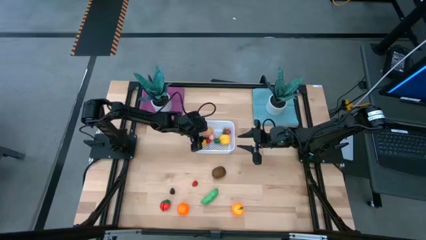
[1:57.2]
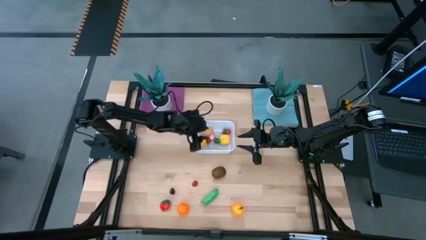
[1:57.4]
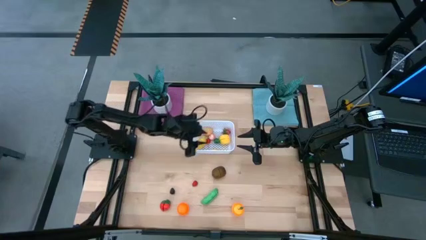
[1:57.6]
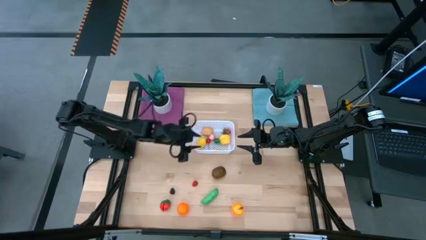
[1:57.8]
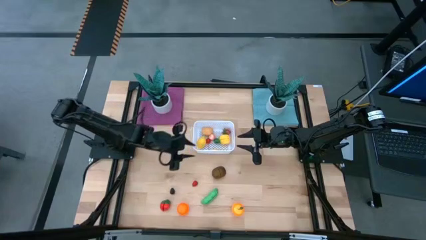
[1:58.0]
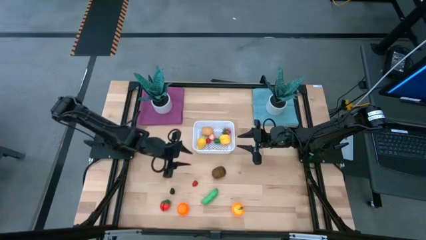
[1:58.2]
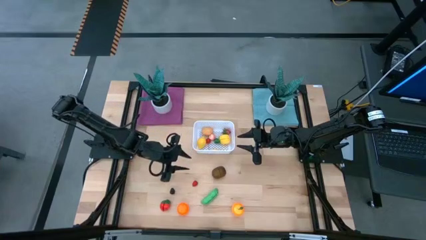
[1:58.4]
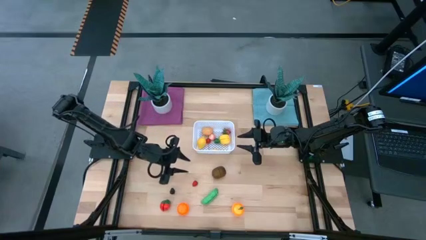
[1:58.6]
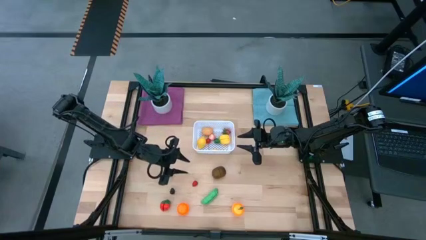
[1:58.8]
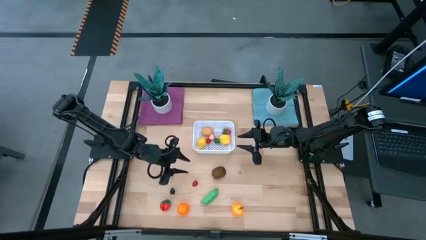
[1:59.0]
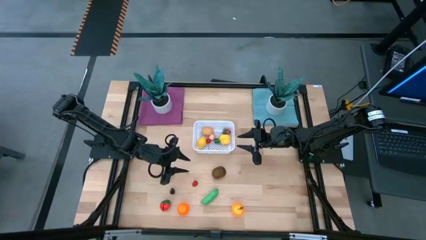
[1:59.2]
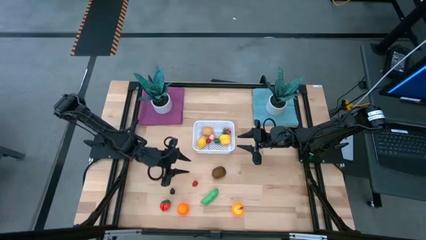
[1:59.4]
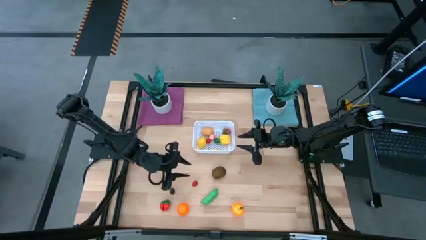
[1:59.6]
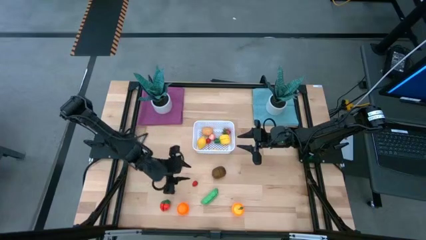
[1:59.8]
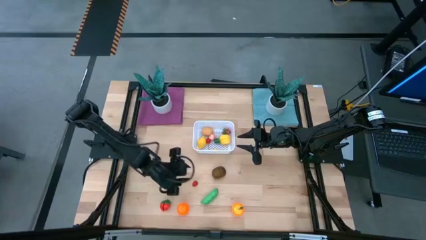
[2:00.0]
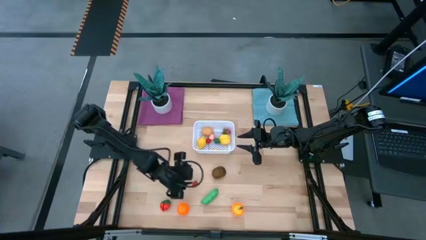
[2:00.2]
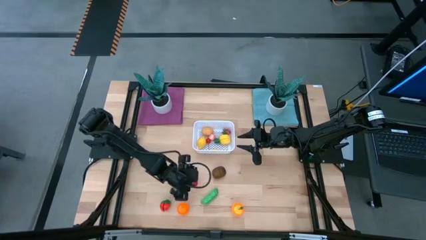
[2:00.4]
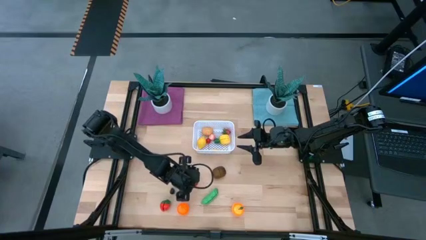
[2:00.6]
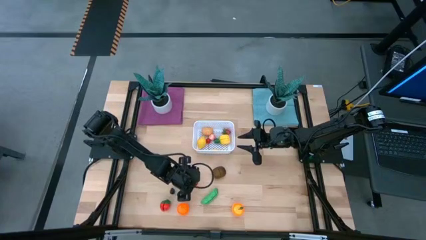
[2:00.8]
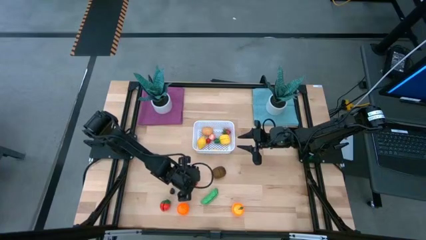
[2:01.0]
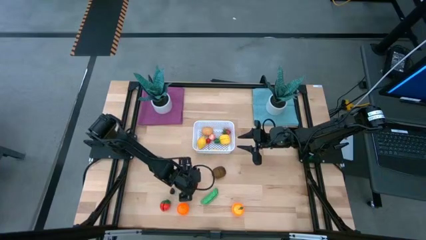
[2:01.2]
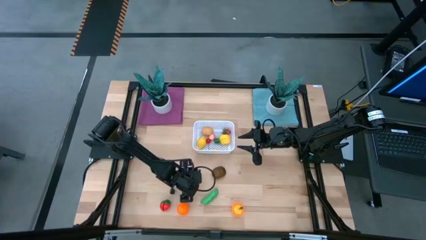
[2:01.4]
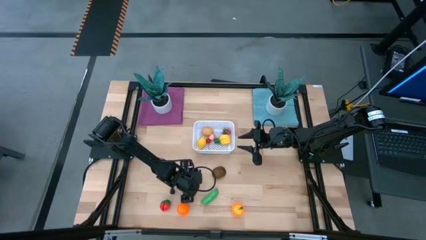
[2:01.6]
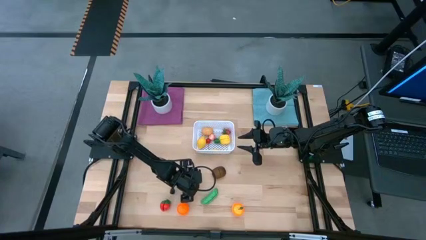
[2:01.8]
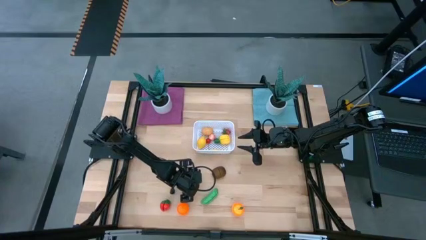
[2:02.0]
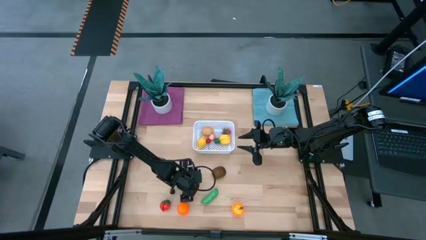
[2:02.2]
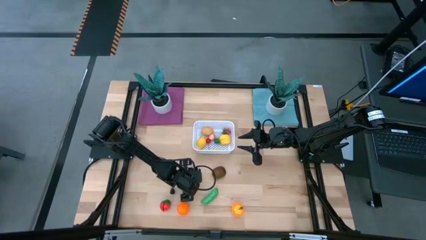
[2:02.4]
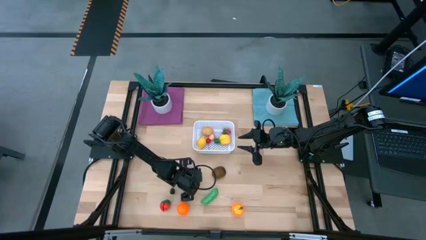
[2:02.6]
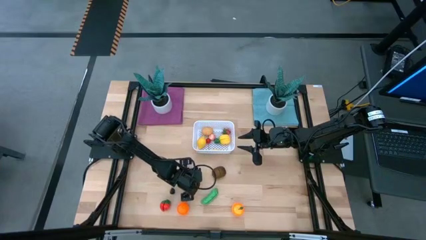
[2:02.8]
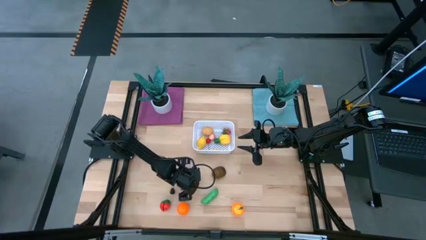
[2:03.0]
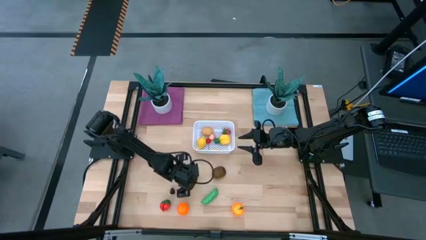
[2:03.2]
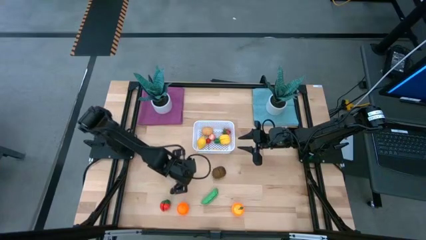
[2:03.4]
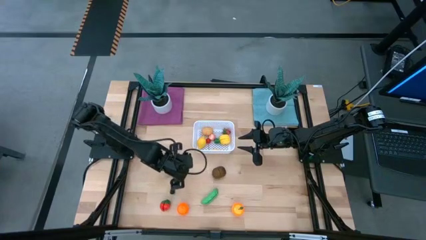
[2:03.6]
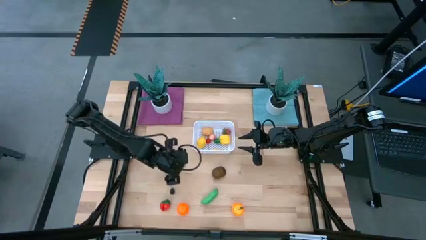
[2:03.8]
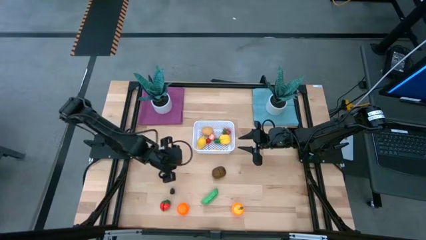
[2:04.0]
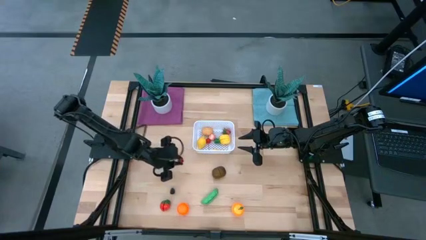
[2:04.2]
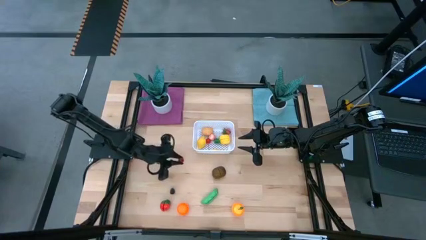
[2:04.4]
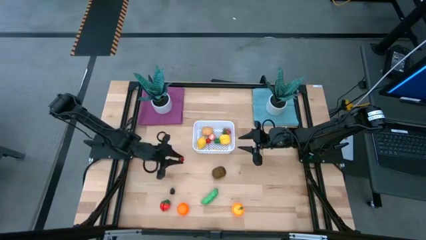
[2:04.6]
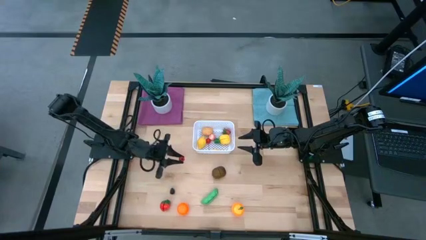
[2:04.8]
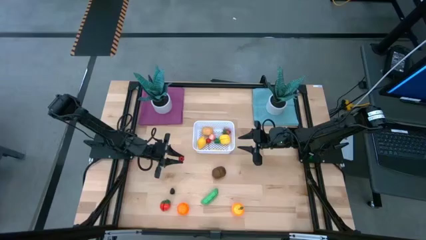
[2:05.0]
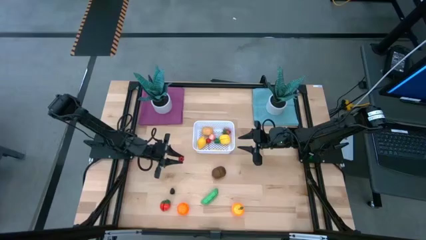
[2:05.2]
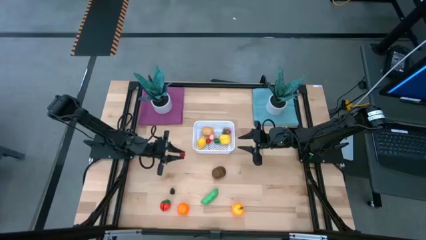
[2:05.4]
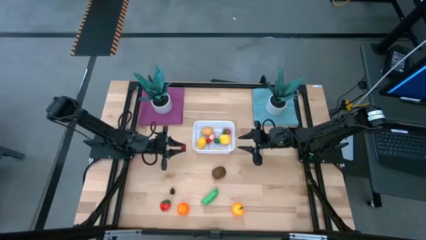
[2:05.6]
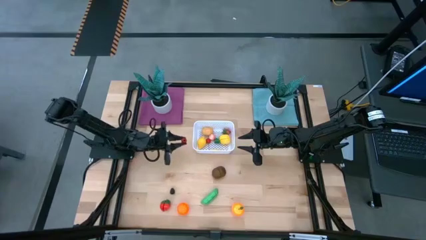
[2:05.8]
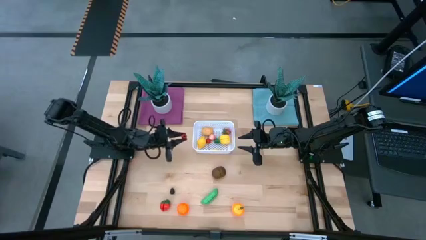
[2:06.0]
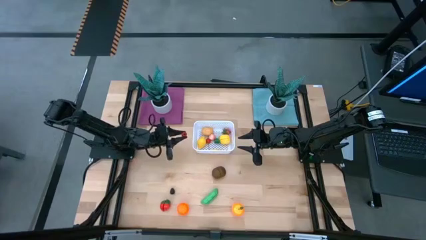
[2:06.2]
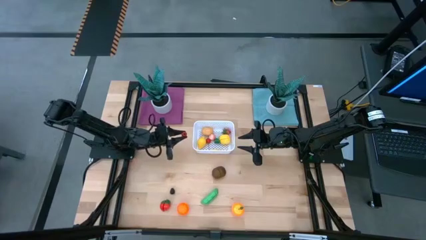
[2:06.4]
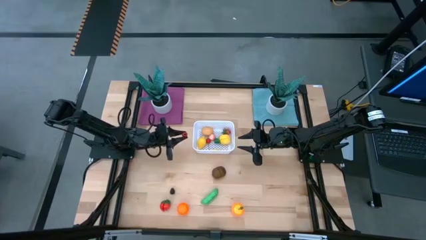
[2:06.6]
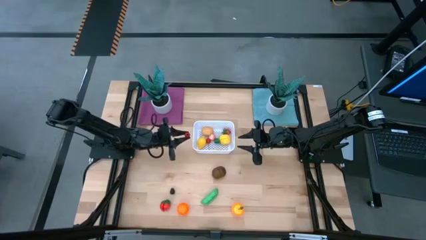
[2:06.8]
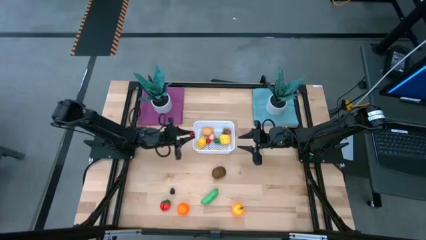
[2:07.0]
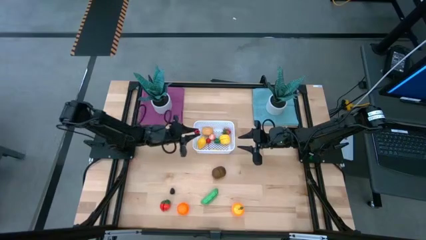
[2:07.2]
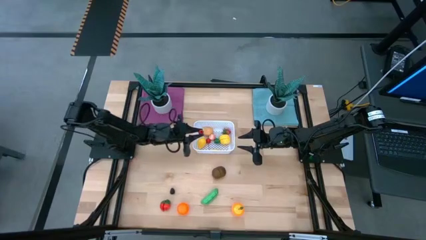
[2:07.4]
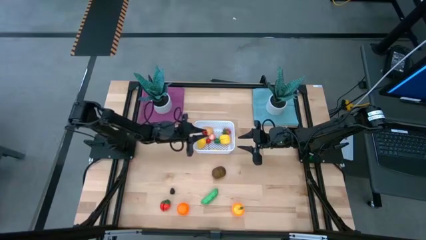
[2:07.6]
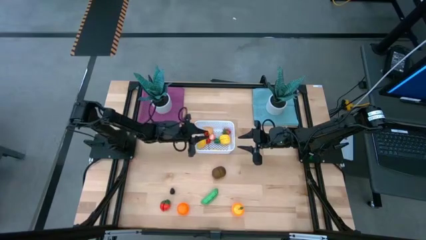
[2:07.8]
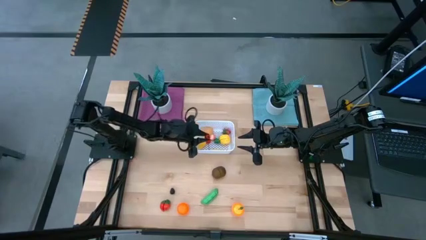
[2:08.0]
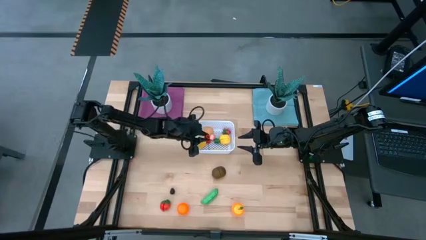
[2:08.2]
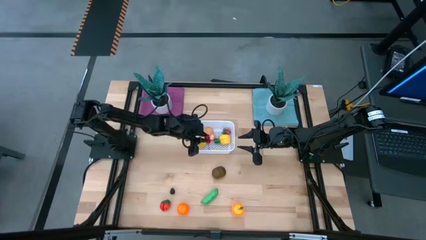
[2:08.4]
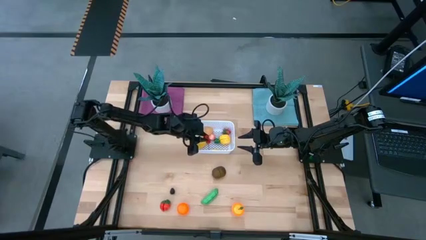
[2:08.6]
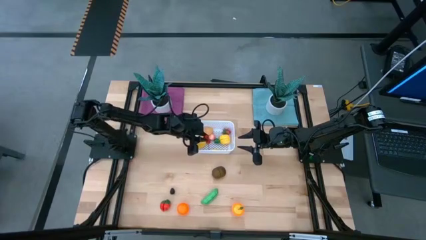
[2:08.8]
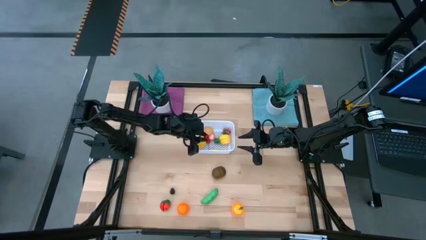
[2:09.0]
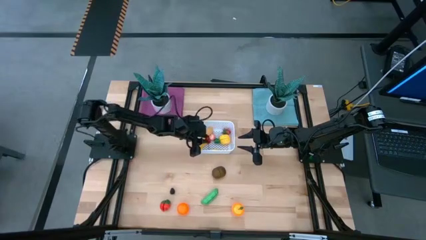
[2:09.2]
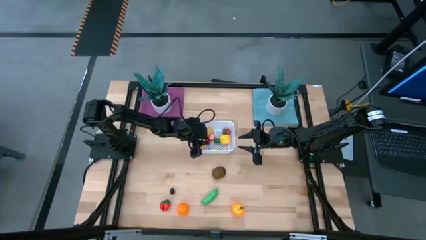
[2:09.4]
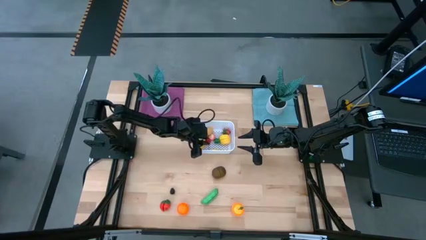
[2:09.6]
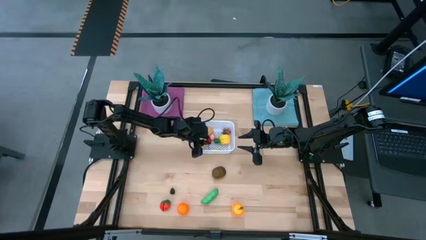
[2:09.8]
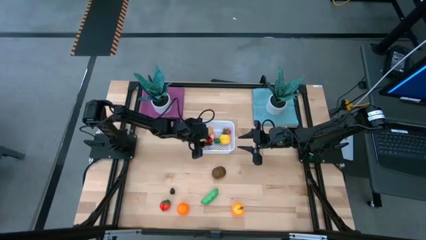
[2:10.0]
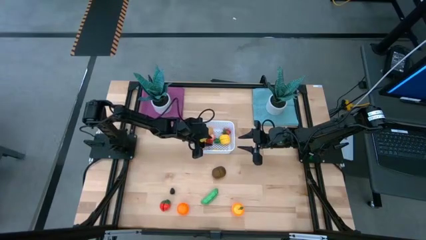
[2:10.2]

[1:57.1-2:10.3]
Task: Pick and placing Produce into tupperware
Put the red raspberry into the white bin
